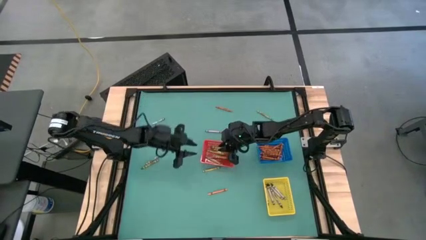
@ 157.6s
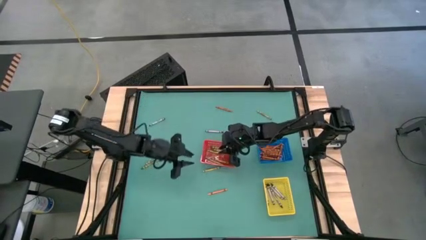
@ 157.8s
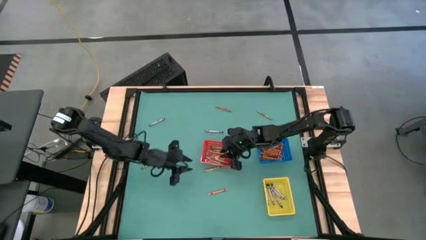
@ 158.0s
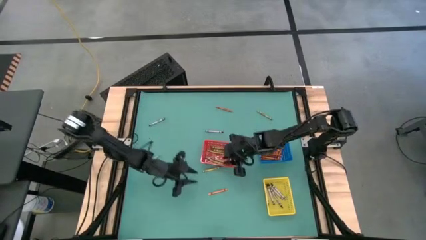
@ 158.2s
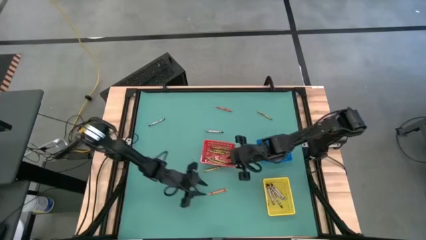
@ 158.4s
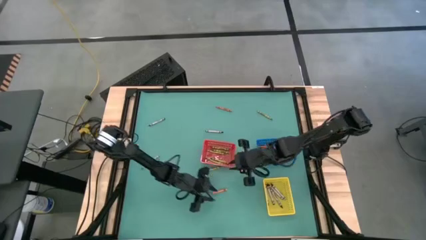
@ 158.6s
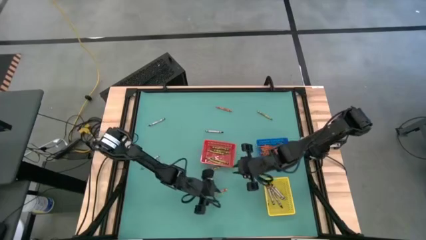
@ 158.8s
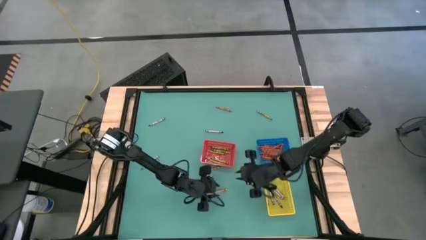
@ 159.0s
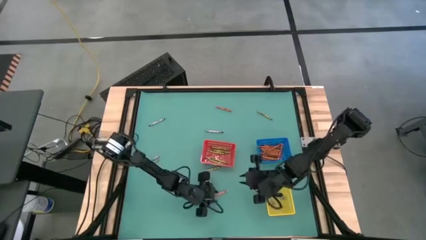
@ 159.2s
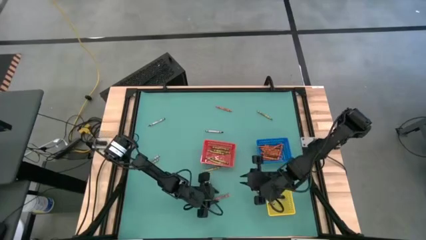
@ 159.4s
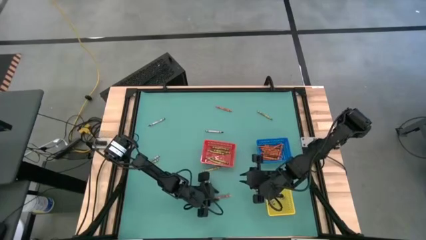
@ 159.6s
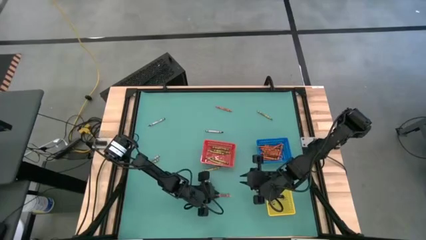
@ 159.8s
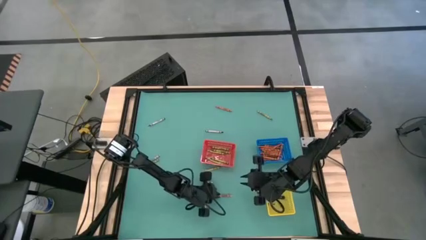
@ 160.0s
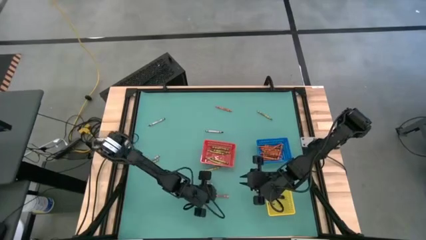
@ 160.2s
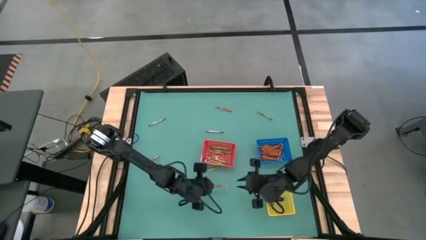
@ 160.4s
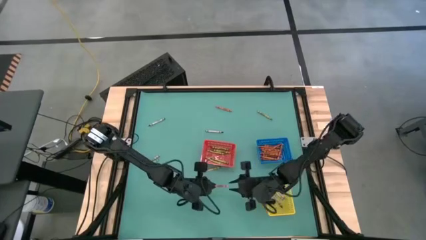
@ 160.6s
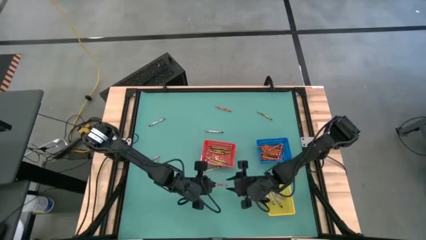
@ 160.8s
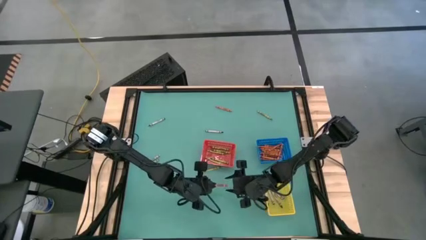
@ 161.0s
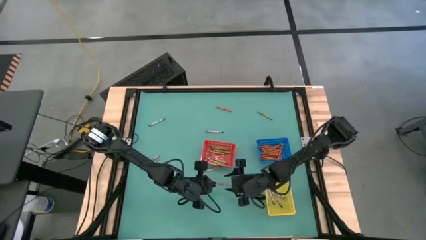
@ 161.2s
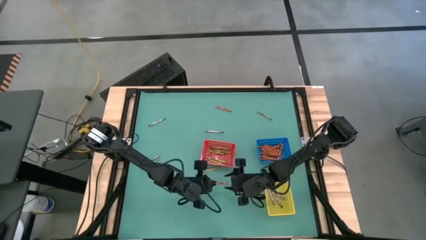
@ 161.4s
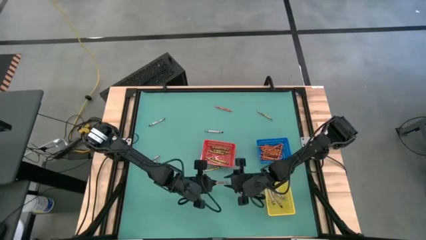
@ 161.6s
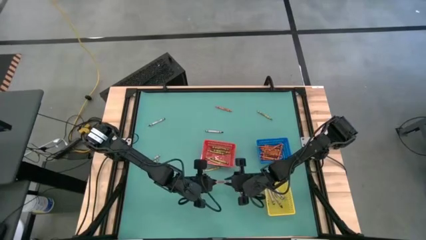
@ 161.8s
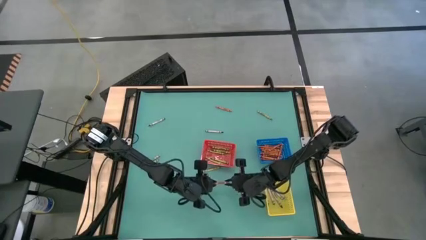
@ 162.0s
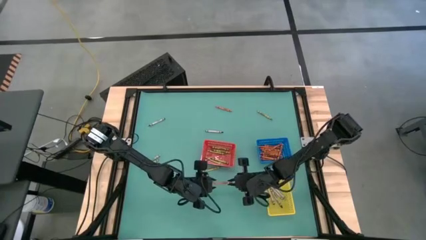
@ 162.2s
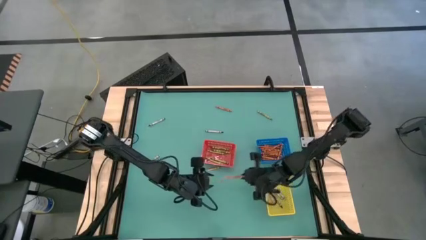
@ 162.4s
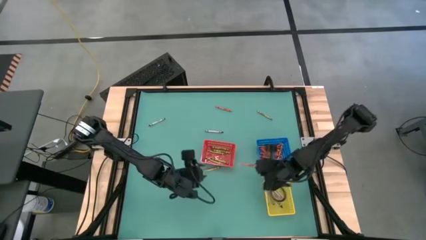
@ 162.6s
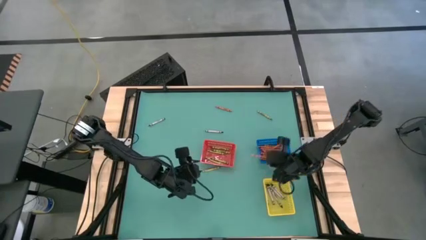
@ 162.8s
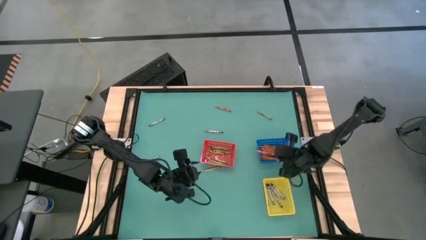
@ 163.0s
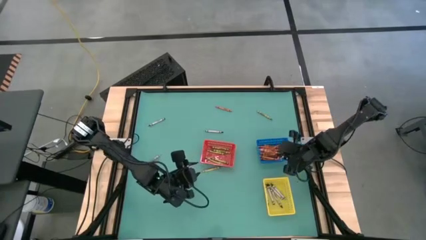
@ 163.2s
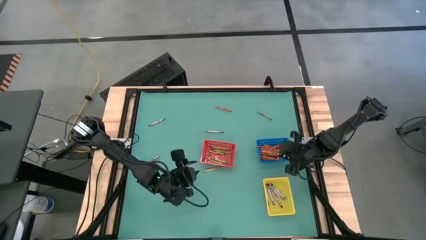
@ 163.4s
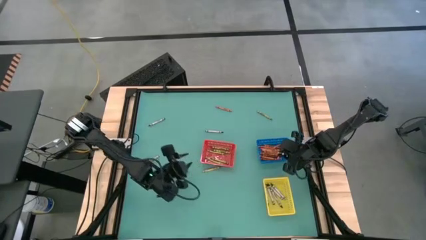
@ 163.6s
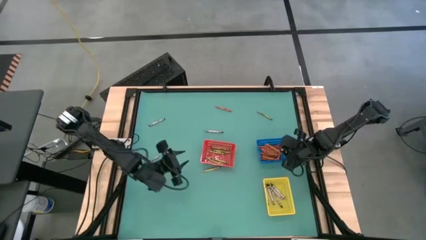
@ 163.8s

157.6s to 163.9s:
Task: Sort crayons
Put the orange crayon into the blue basket

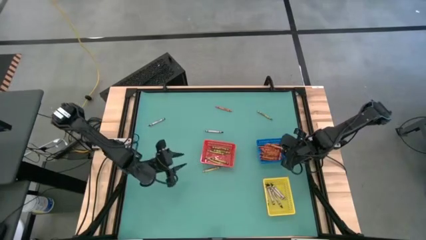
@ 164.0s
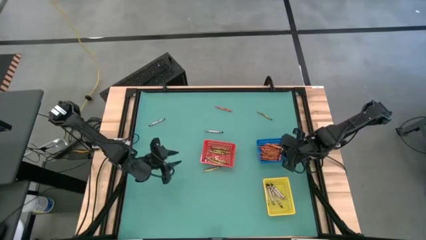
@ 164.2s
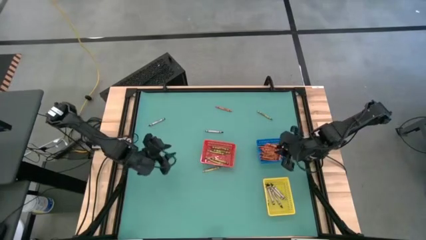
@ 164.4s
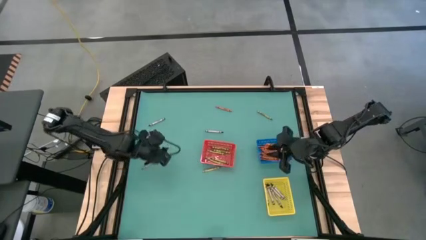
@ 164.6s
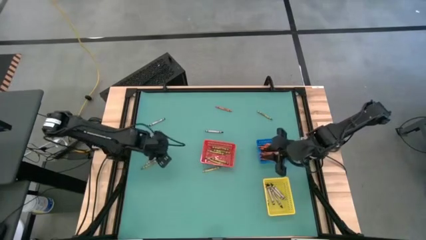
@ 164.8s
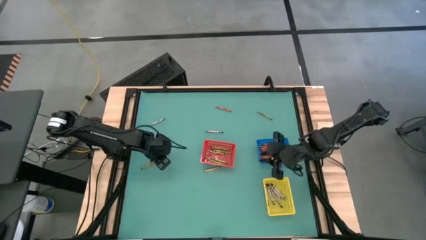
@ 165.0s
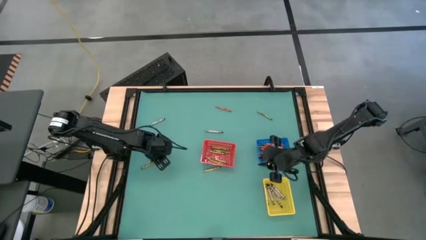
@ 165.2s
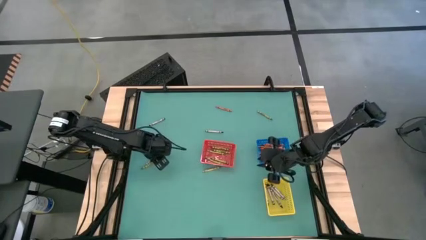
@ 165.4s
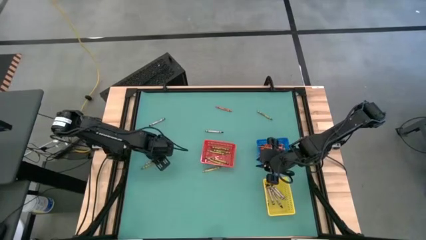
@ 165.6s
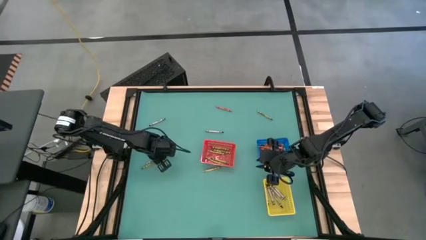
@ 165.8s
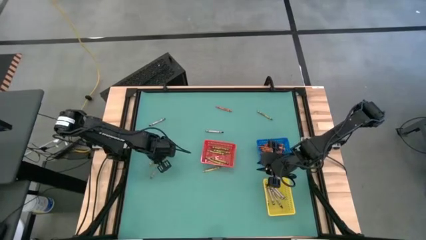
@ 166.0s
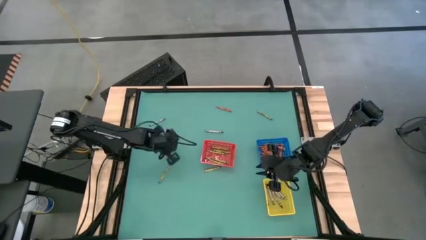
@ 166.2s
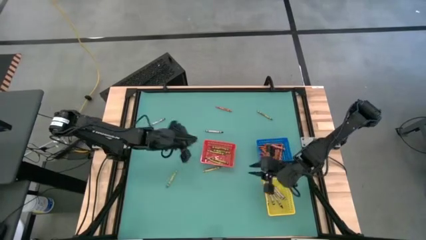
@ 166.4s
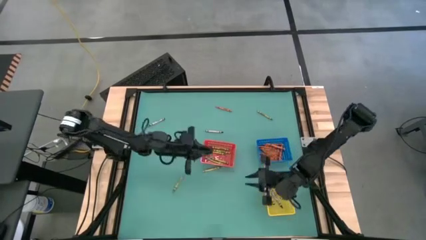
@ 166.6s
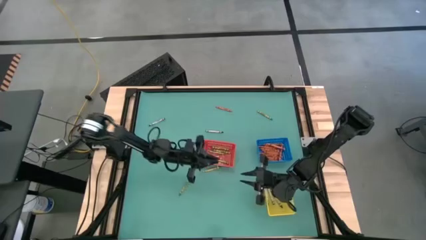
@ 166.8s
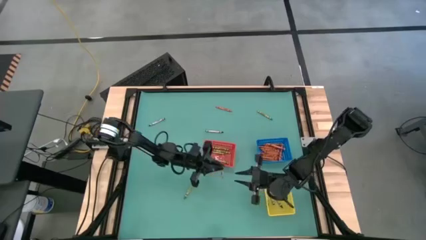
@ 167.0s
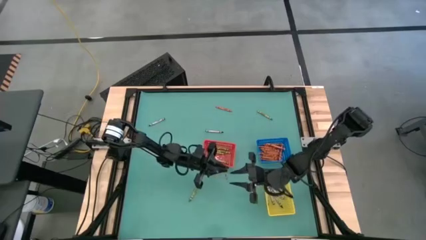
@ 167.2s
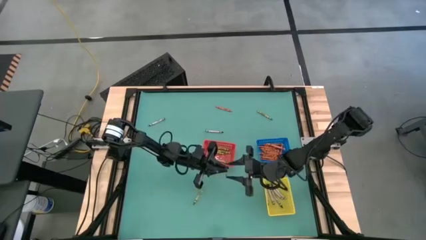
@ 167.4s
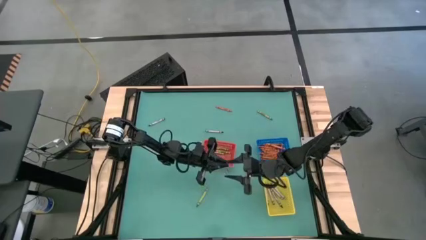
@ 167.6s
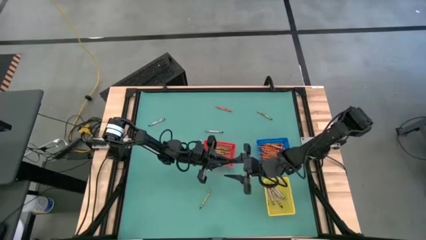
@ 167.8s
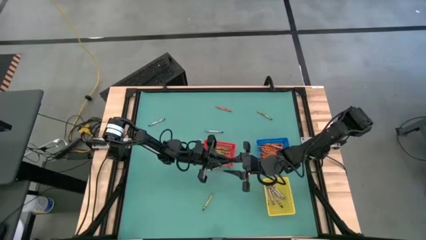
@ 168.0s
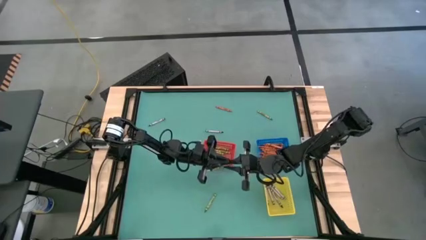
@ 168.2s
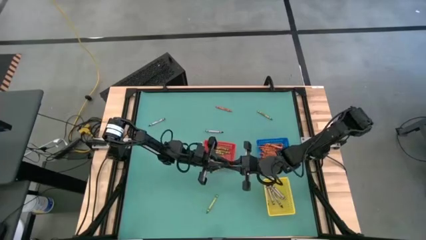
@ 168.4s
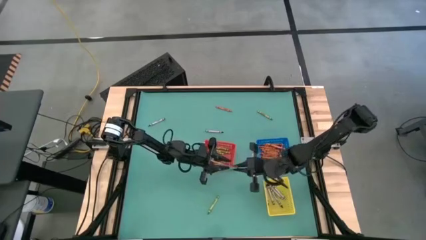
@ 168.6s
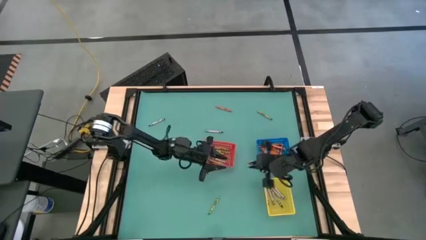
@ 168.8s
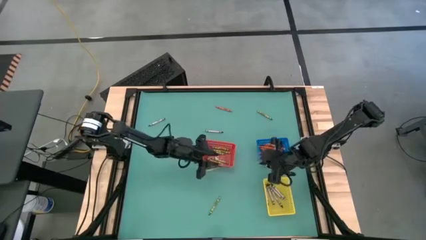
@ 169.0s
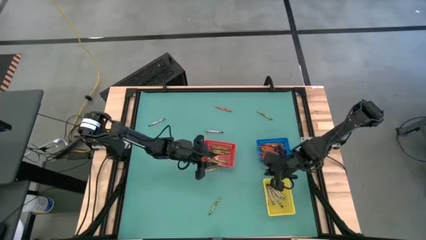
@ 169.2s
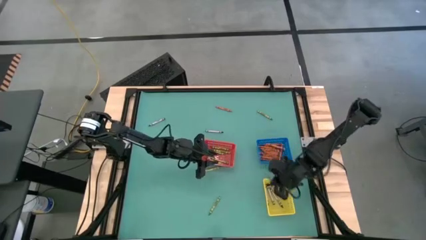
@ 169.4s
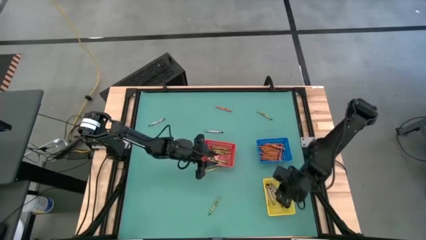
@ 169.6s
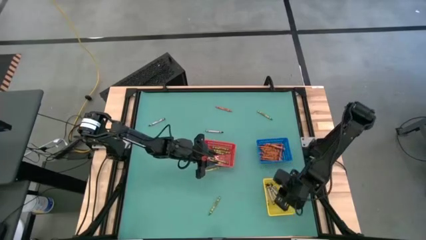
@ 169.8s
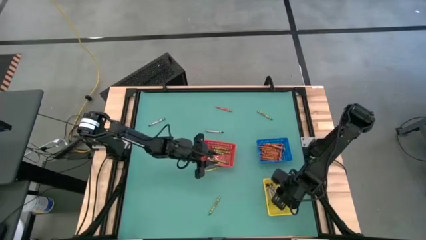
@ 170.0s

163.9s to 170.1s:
Put the black crayon into the yellow basket

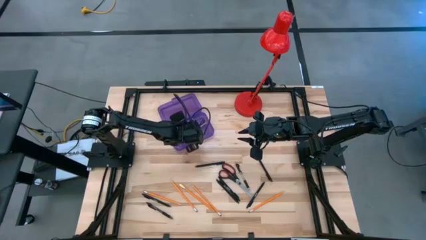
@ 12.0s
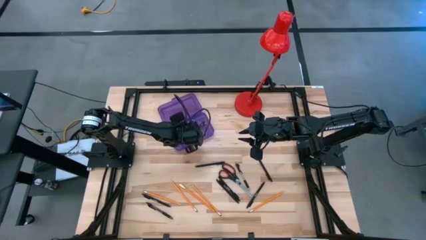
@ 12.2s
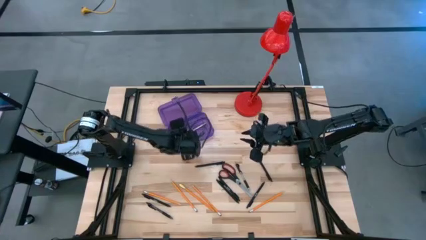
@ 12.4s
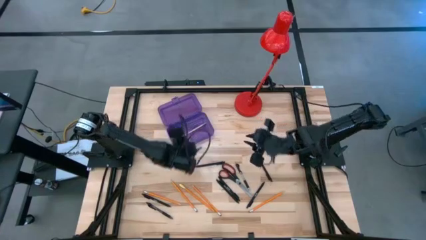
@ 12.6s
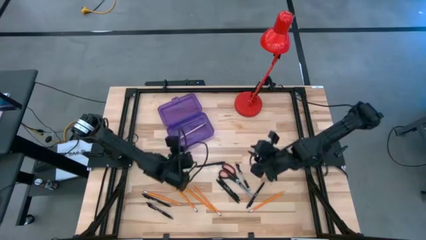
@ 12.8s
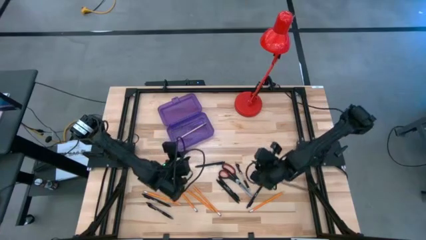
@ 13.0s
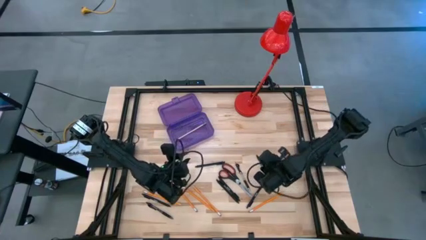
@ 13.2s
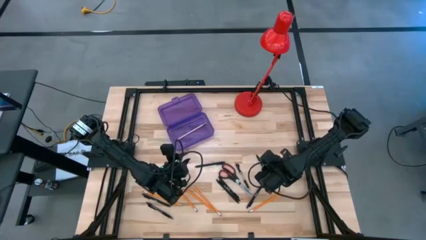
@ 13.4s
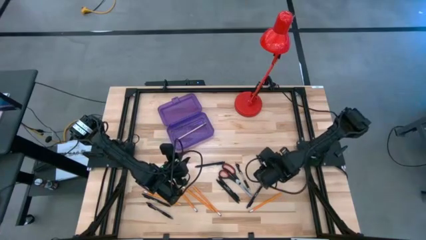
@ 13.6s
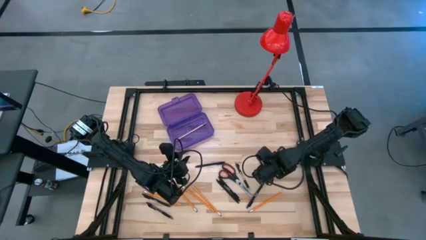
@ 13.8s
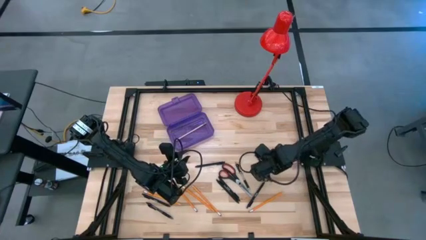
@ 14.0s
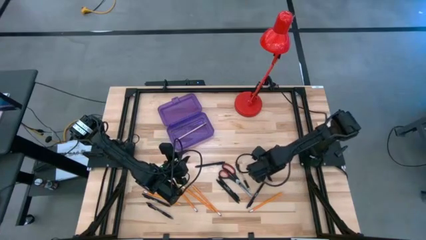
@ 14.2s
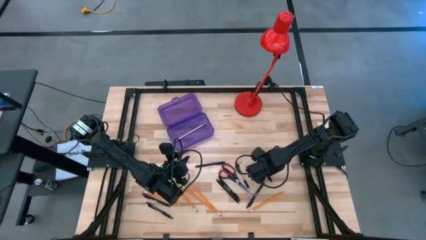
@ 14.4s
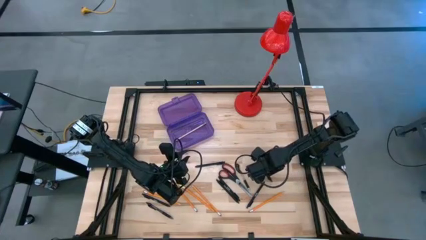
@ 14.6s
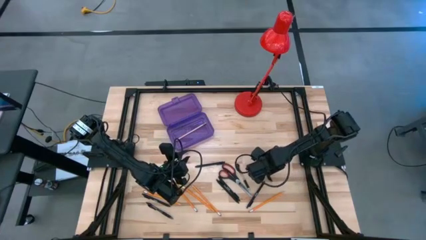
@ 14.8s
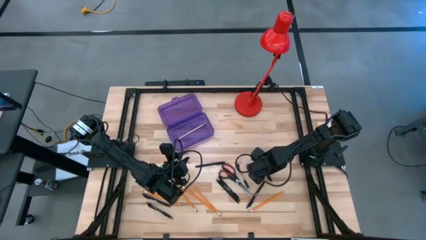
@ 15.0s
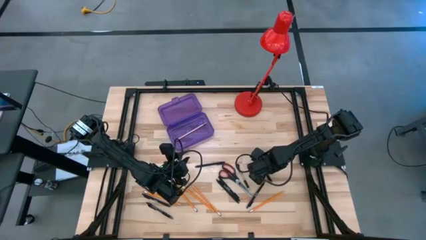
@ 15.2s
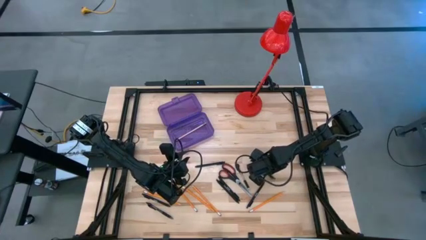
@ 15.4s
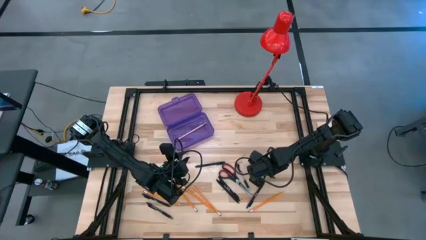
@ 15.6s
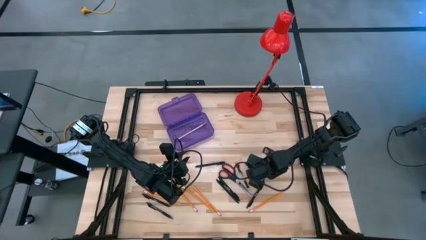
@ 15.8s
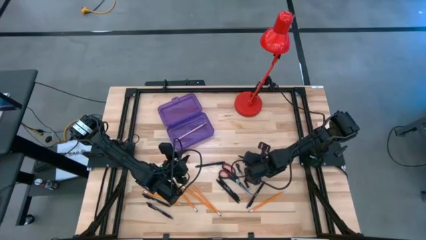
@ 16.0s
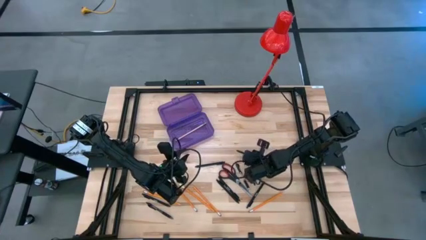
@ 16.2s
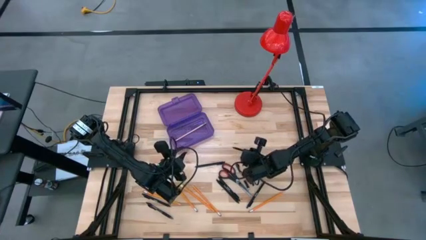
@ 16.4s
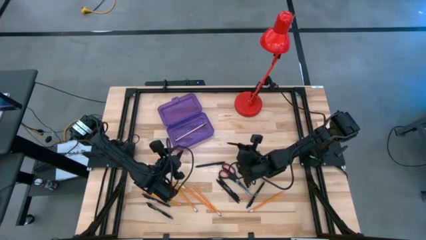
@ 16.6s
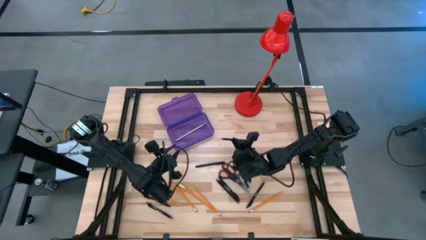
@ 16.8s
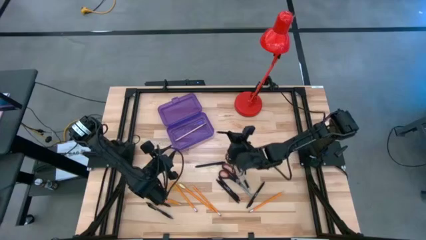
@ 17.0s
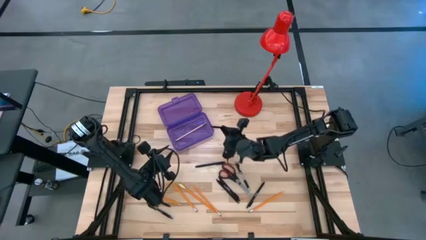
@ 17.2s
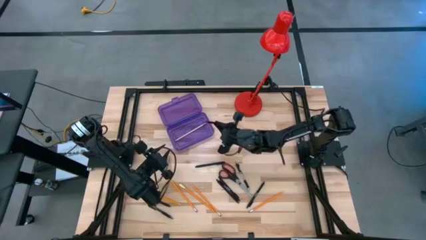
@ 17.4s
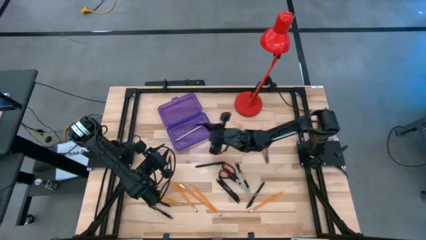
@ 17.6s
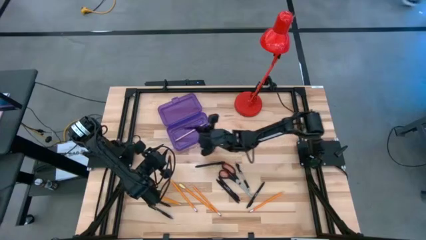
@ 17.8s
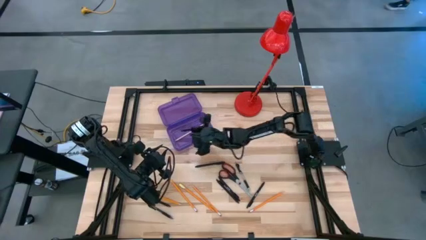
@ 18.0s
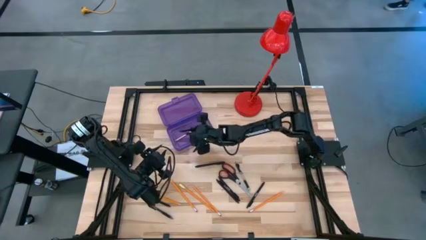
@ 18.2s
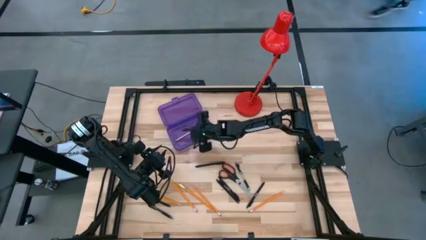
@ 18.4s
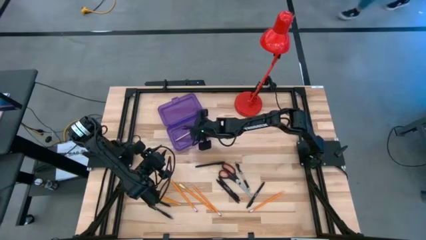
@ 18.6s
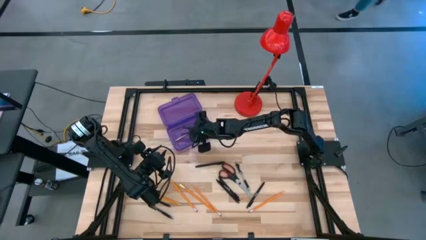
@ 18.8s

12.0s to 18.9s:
Task: Pick & place school supplies into a supply box
Put the black pen into the purple supply box
